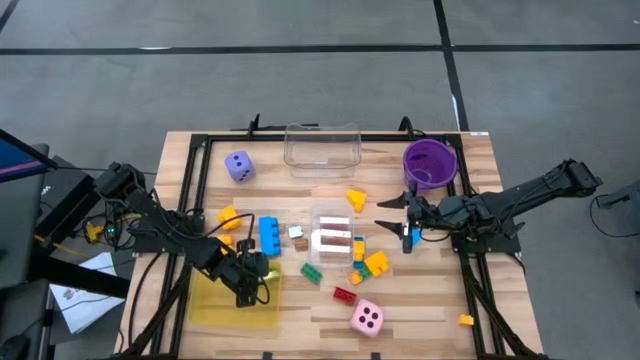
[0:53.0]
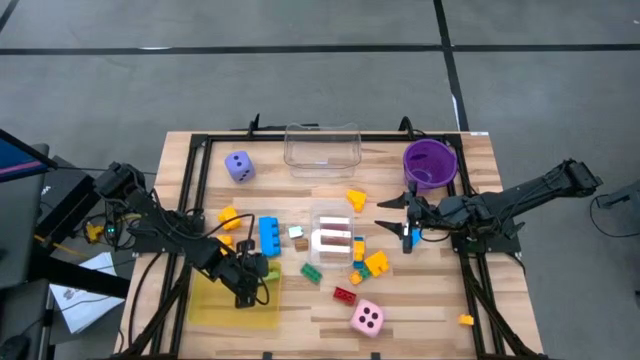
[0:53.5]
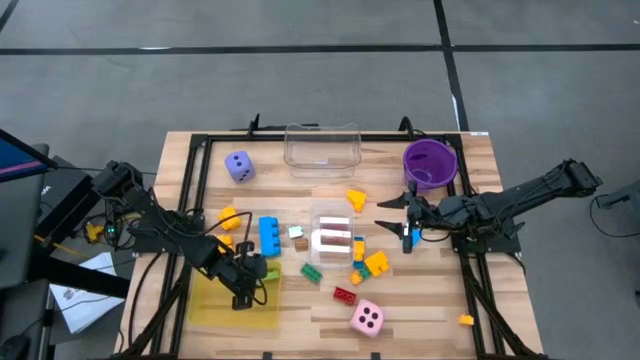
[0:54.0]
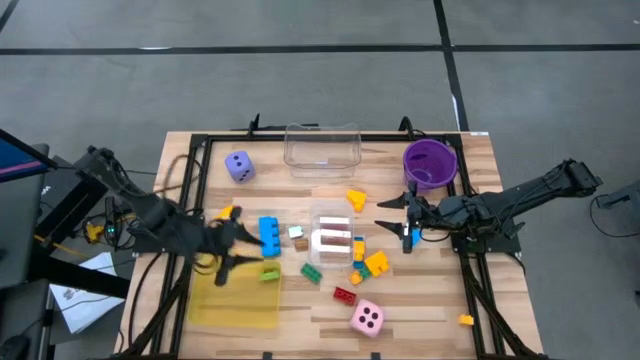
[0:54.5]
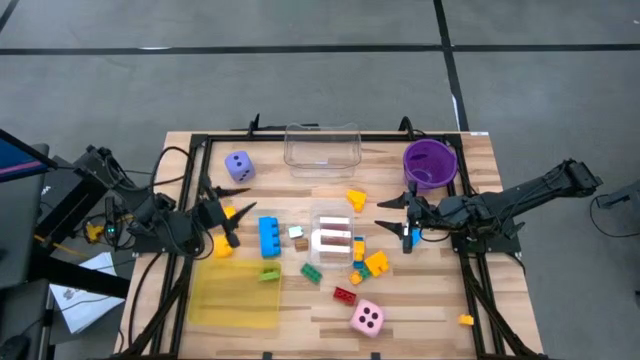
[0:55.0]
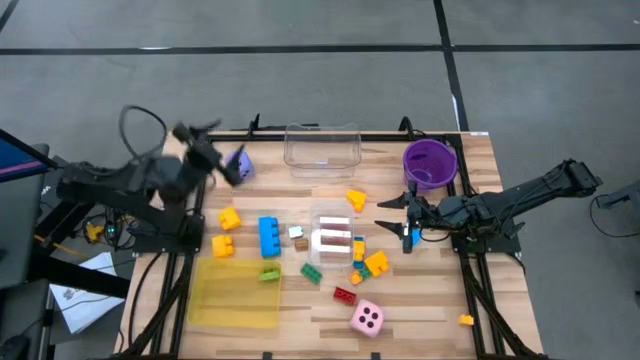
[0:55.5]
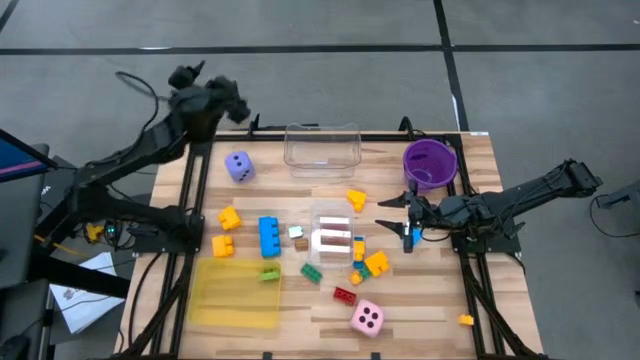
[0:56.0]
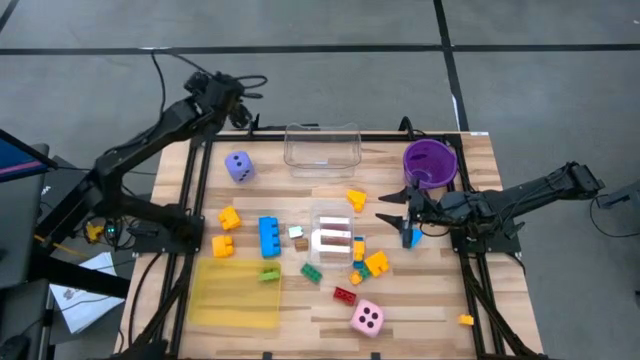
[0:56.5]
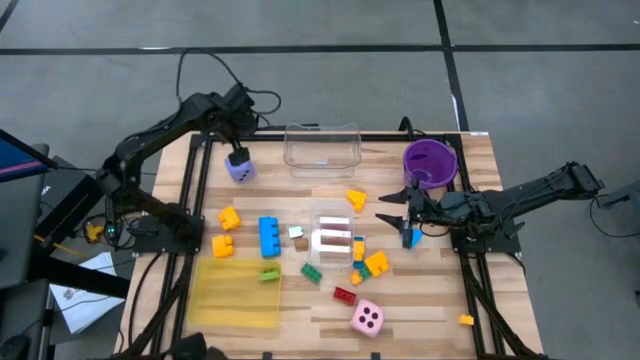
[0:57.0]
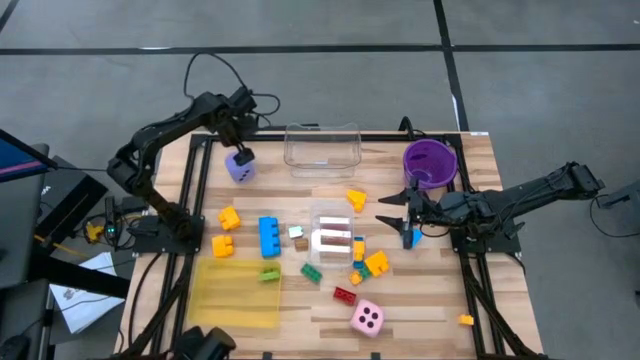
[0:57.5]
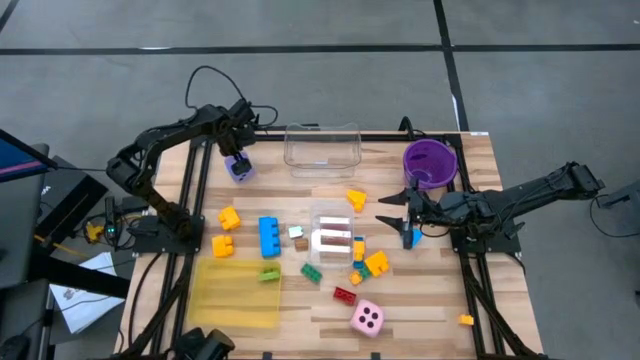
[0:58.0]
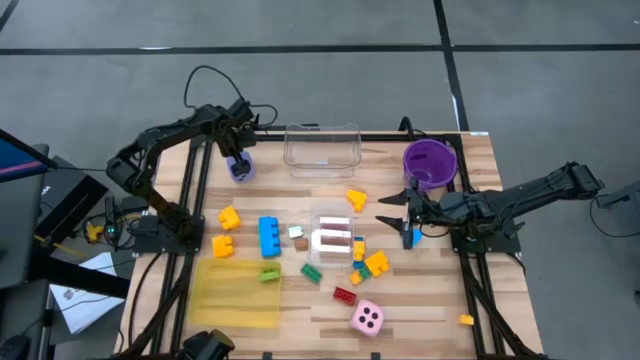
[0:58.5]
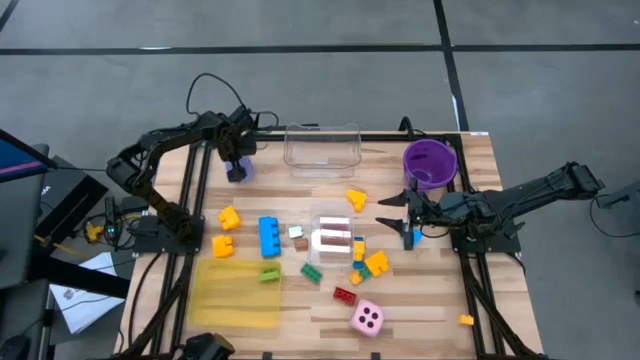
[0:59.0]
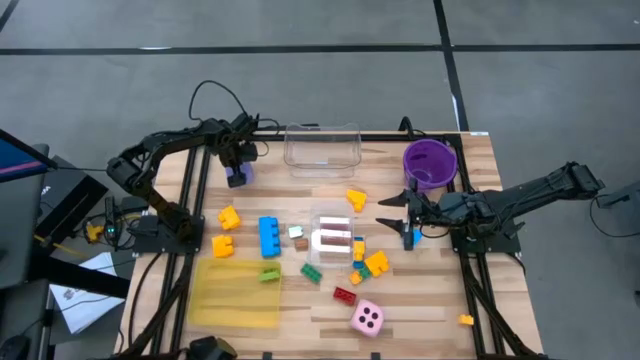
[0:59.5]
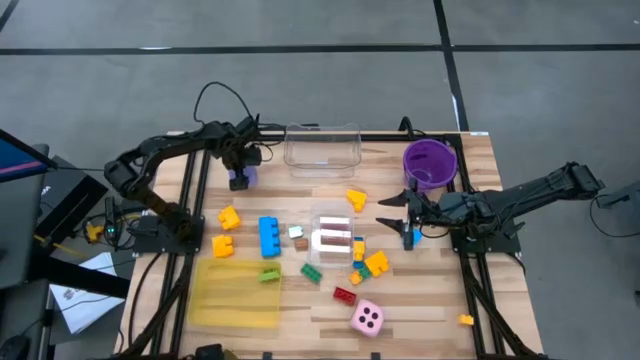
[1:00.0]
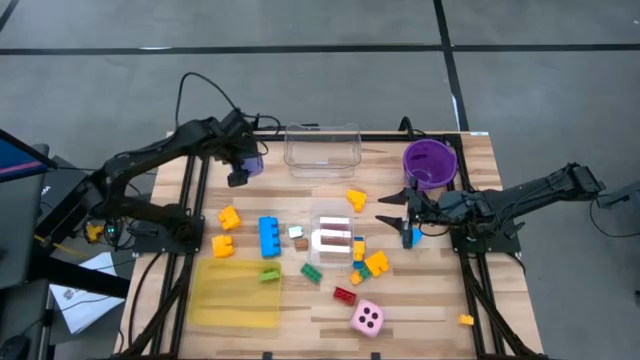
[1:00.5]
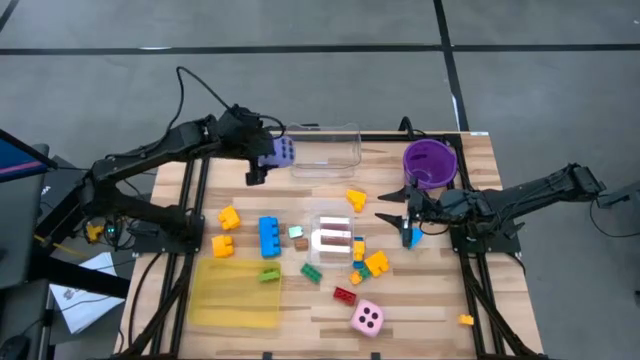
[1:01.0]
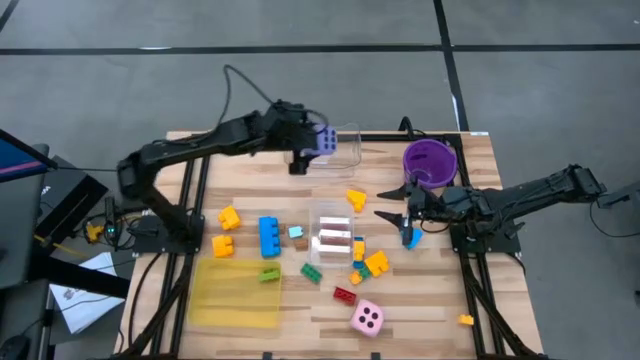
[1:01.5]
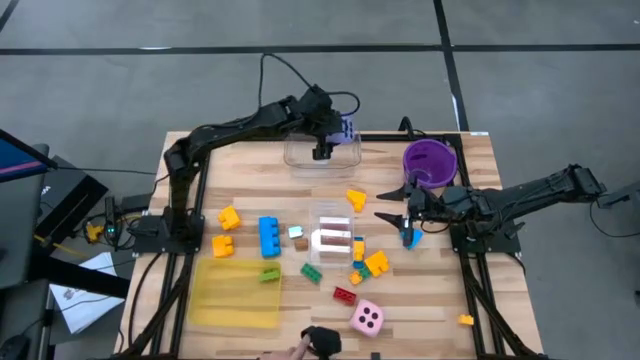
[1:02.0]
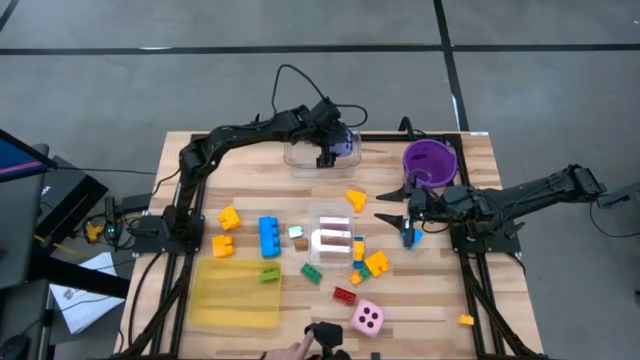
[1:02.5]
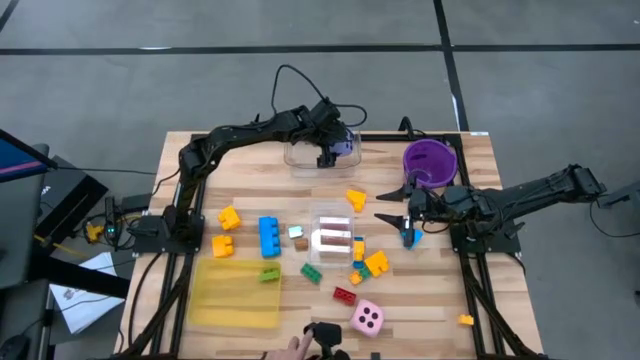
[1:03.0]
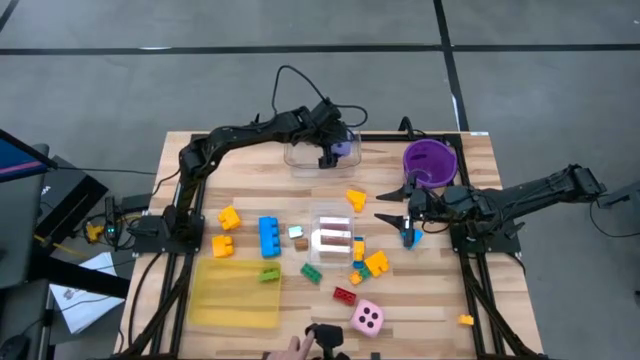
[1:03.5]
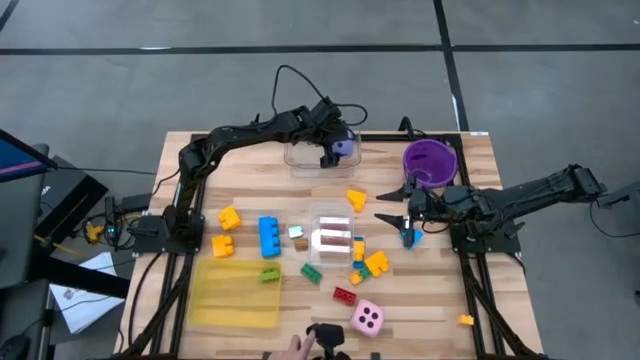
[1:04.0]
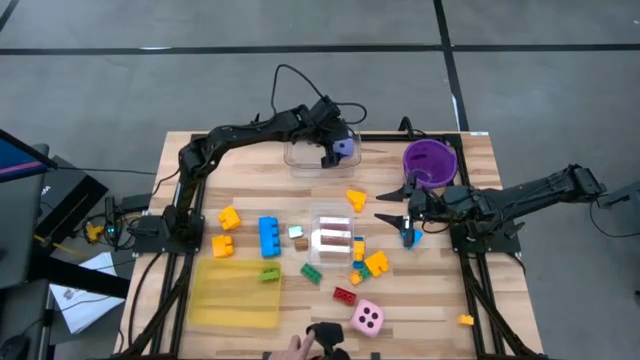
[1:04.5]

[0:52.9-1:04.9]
Task: Pick & Place Toys
Put the violet die into the top transparent bin

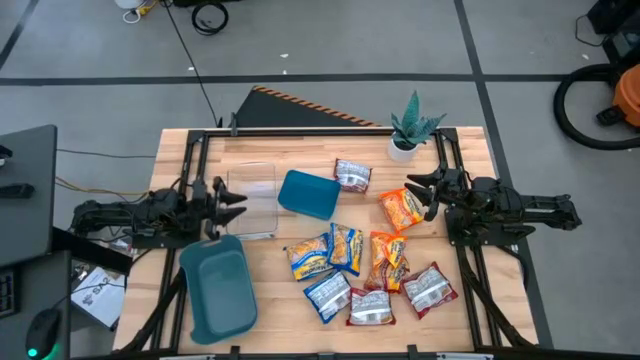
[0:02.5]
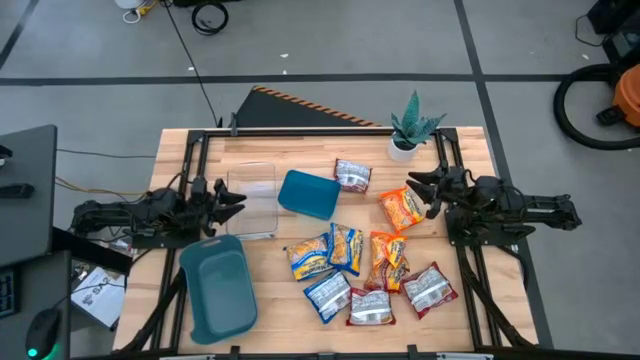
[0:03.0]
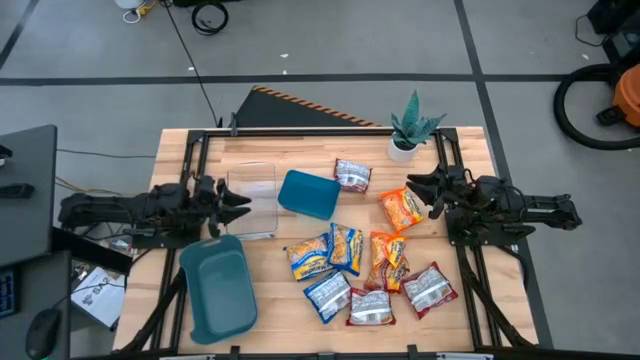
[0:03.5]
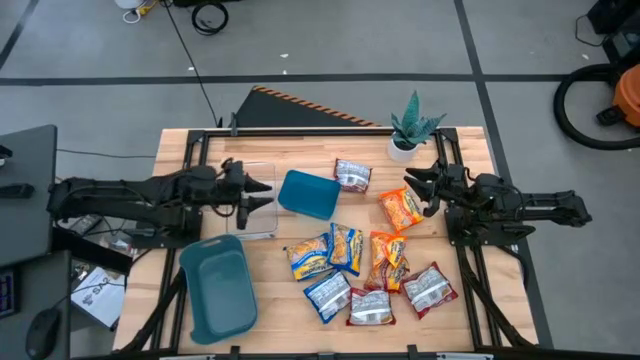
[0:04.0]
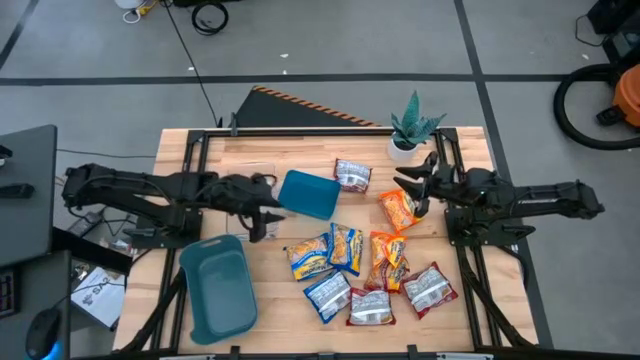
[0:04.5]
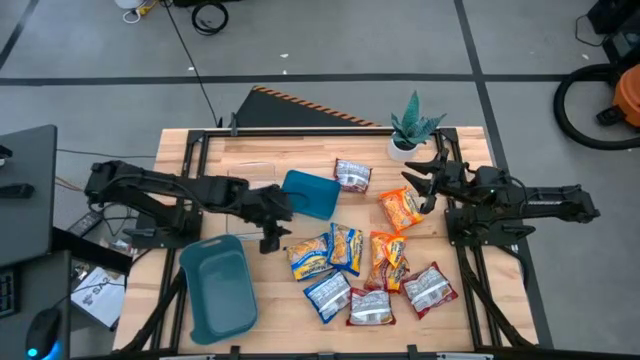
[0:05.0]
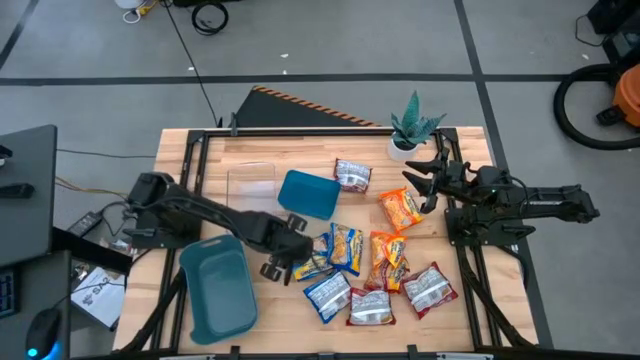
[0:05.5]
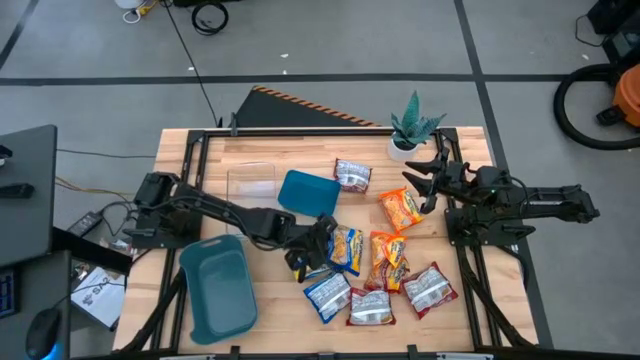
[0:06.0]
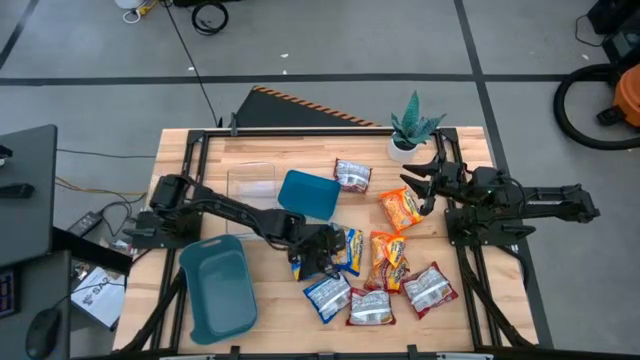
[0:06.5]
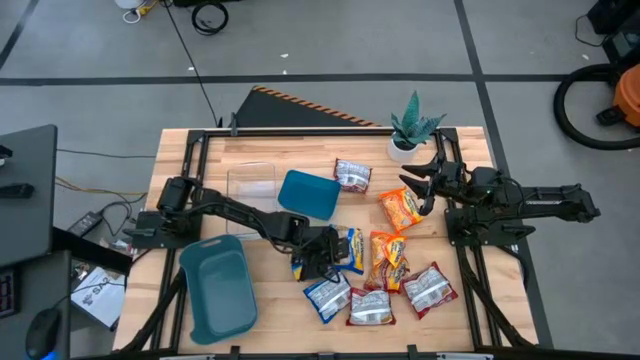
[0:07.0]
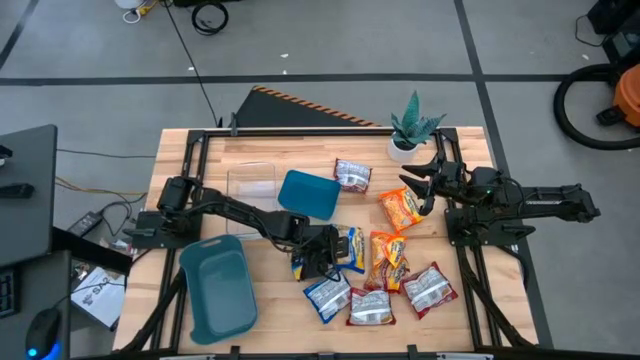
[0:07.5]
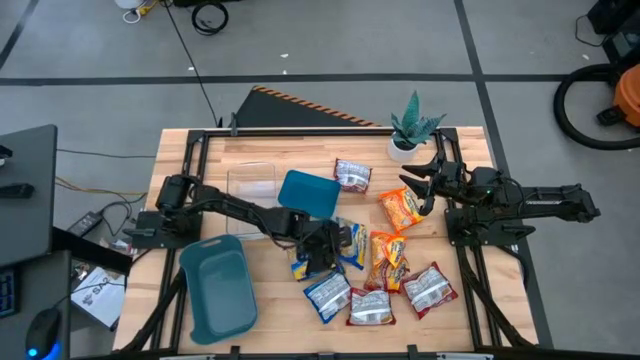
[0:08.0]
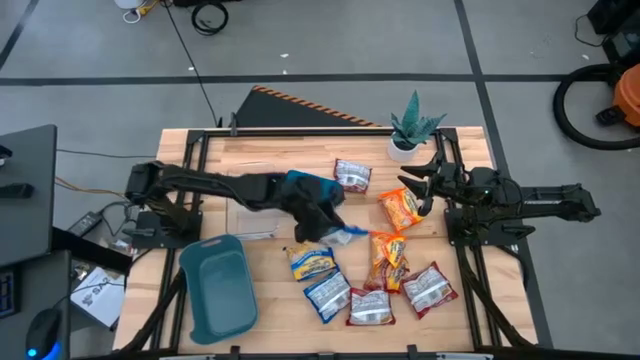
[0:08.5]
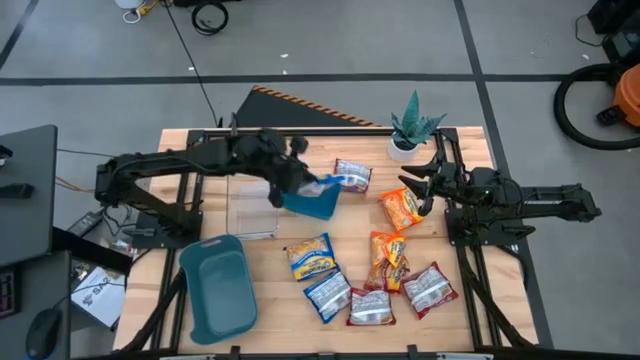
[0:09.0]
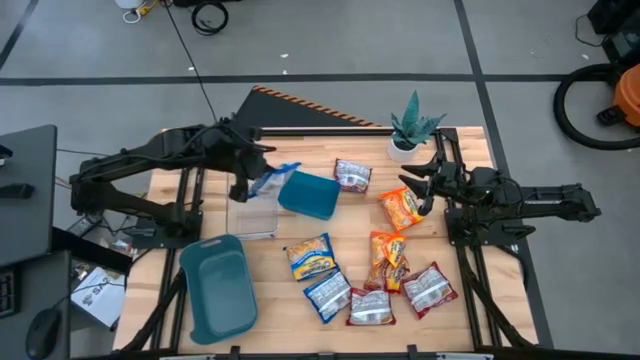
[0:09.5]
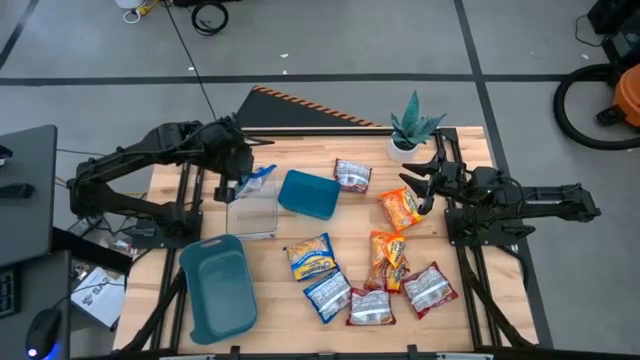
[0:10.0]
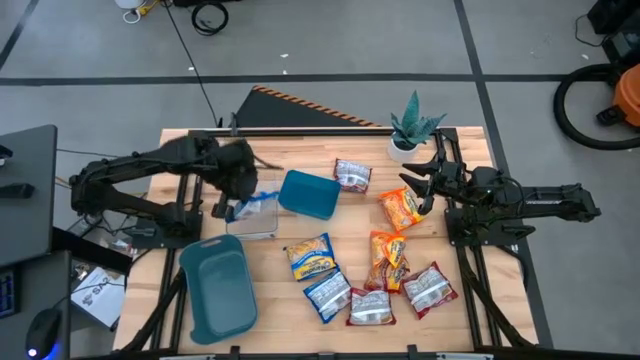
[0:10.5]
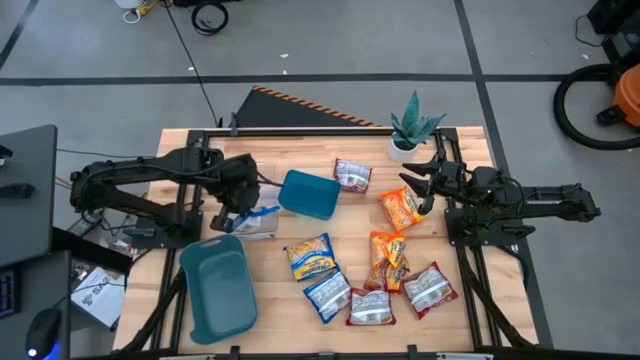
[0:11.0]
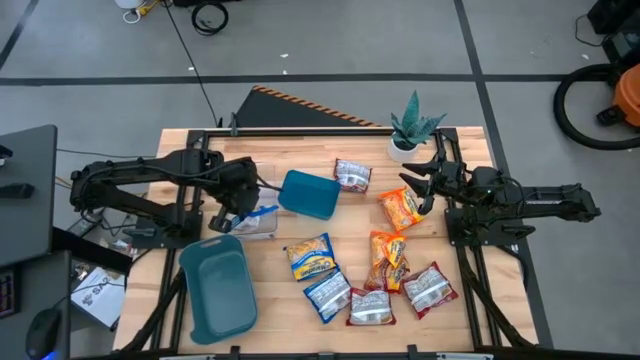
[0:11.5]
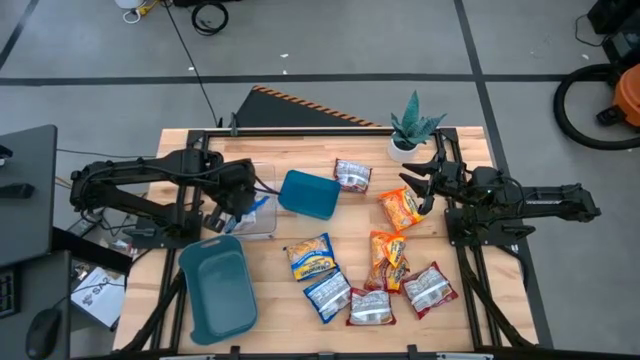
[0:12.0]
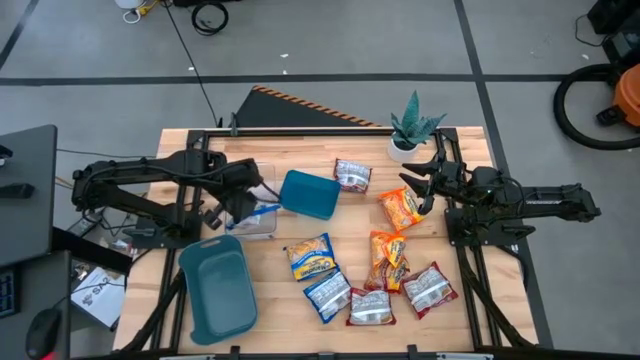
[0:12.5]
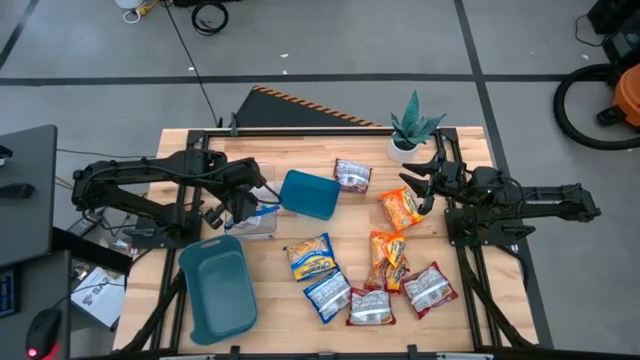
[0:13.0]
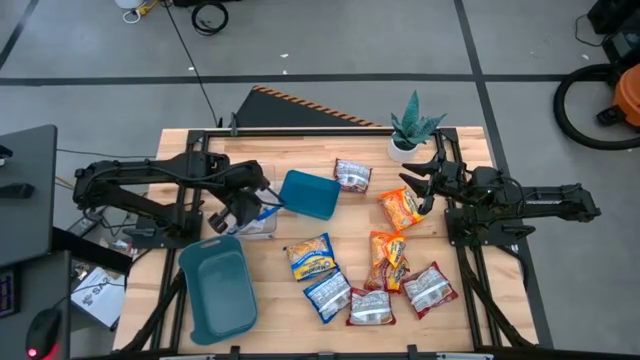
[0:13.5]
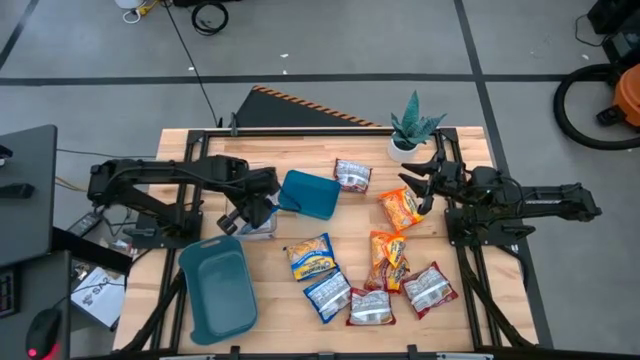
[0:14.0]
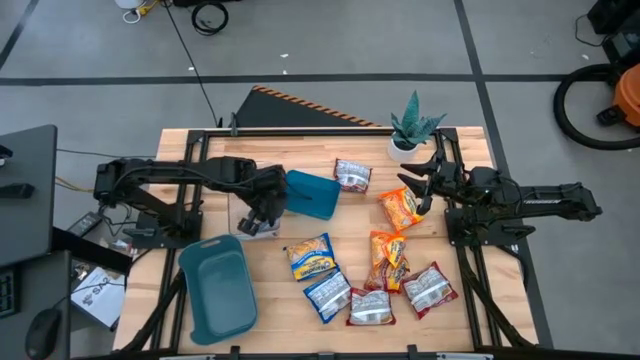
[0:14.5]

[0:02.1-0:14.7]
Task: Sort Maruchan noodles
Put the top right blue noodle pack into the transparent bin
